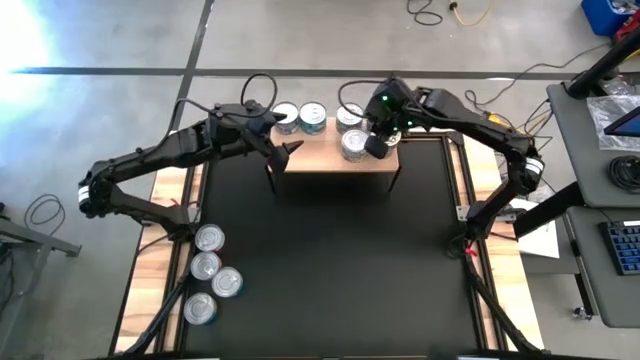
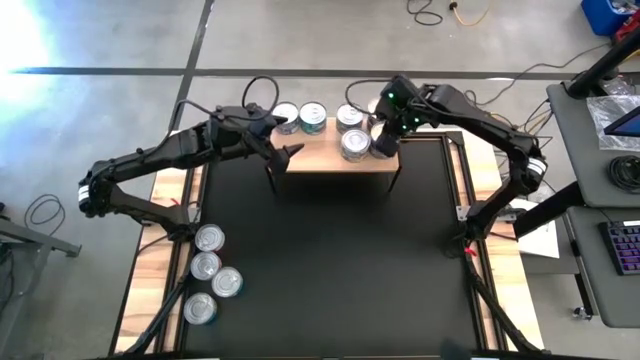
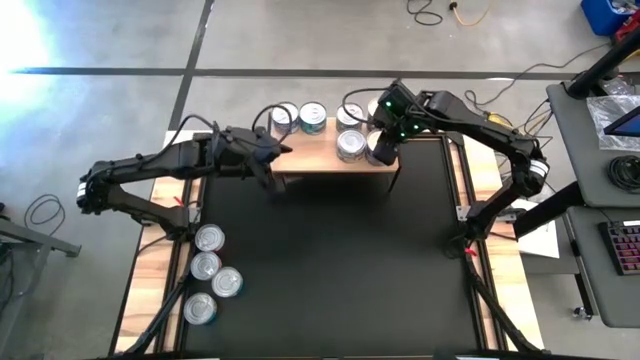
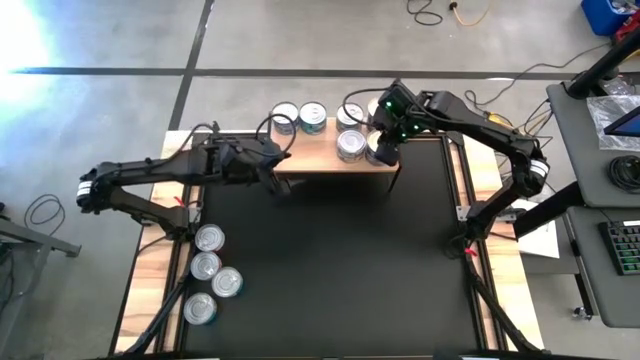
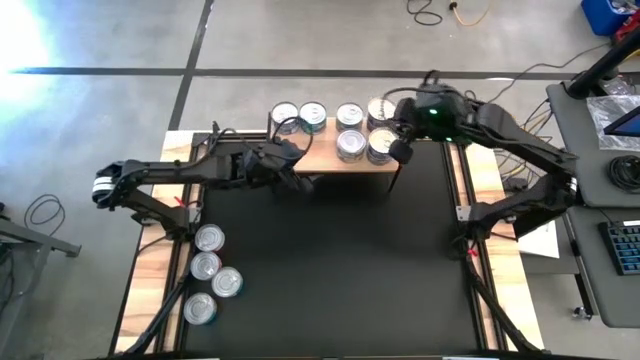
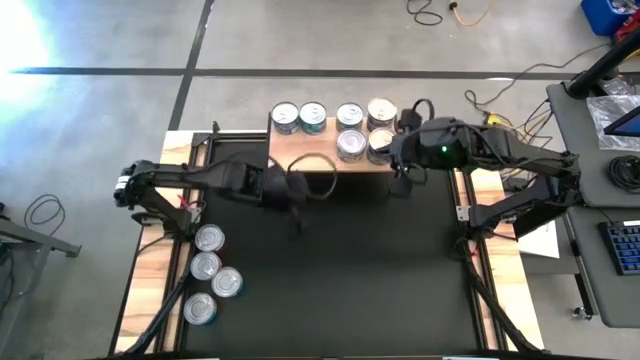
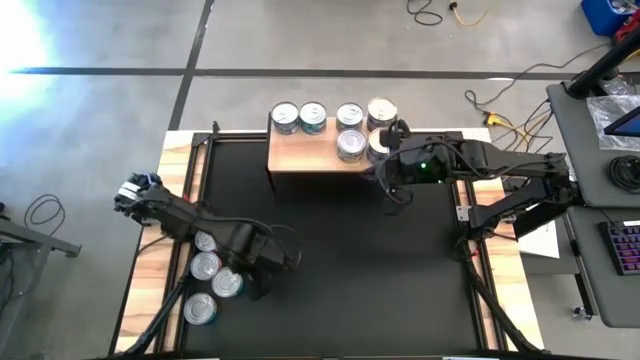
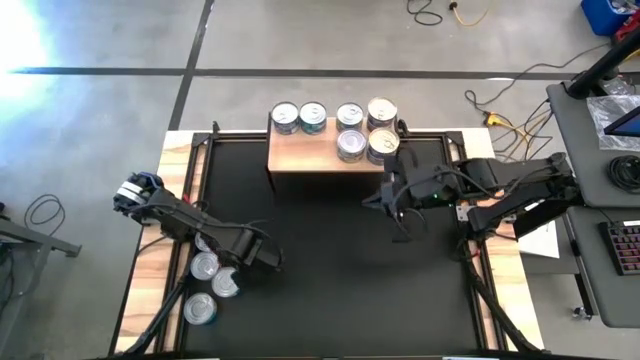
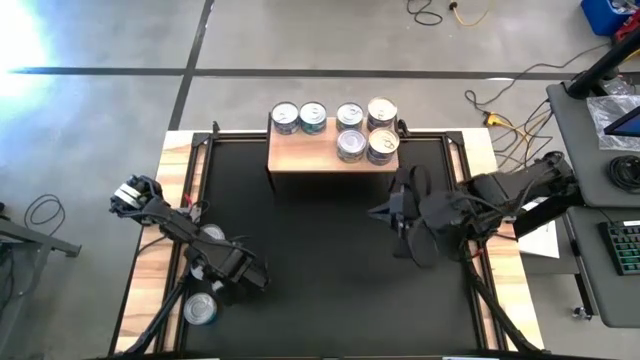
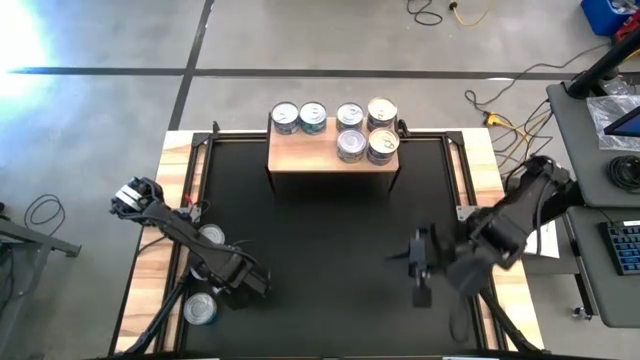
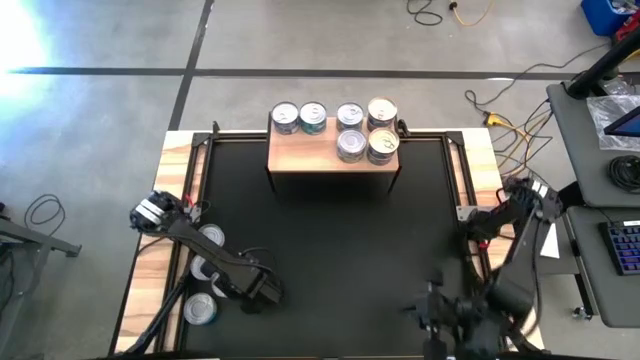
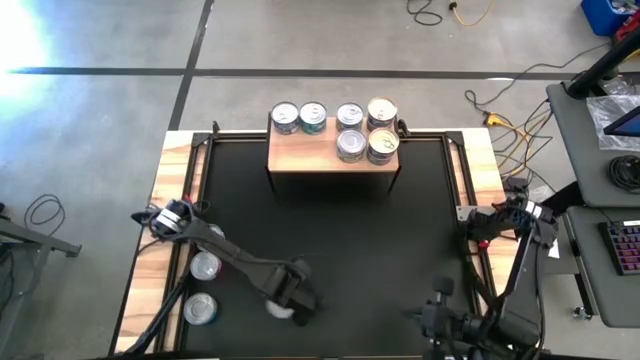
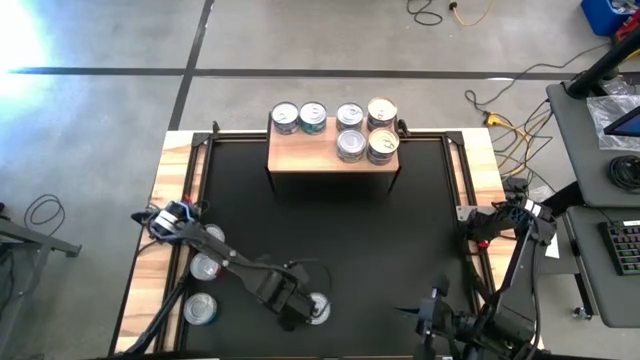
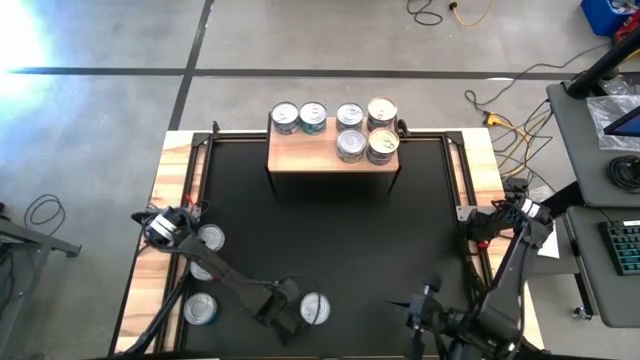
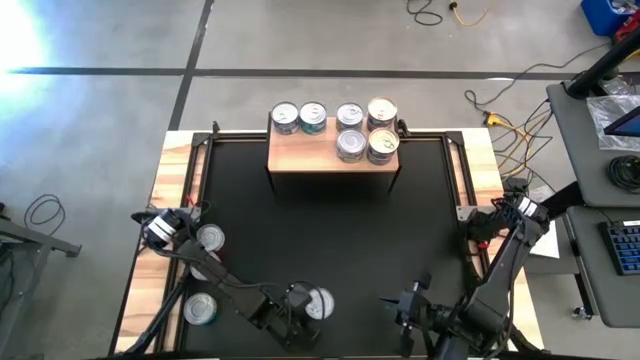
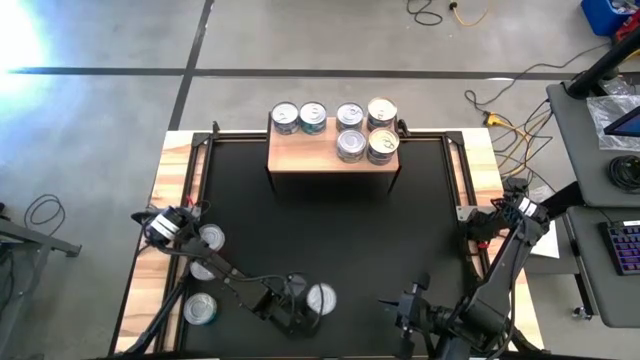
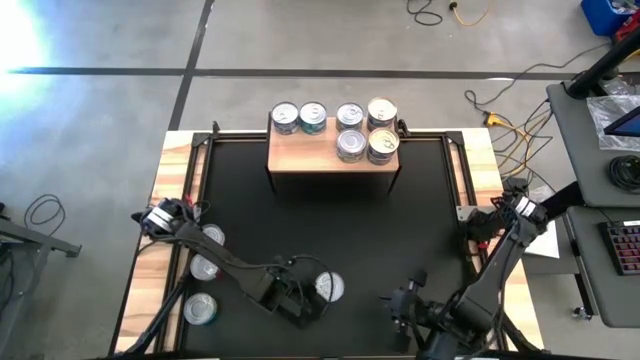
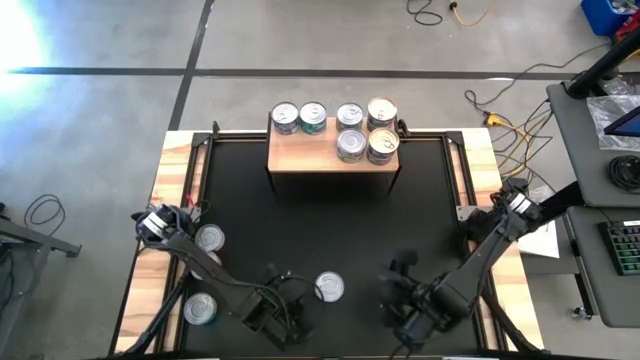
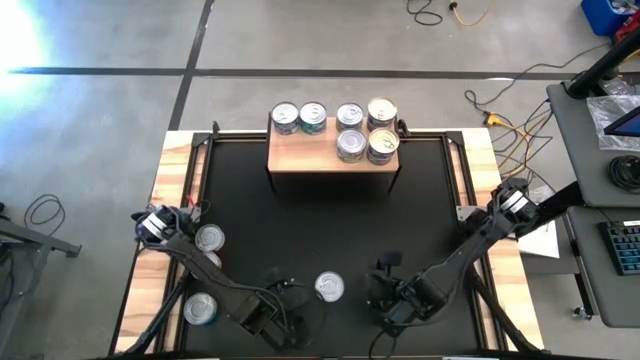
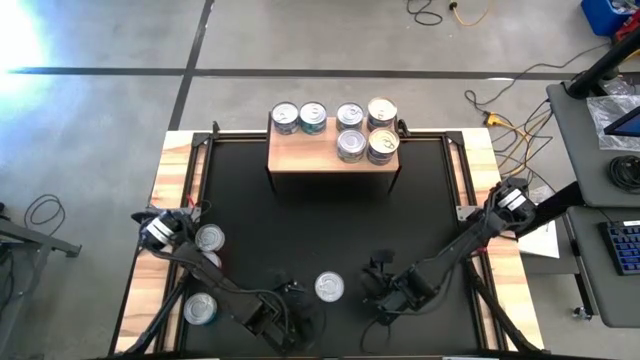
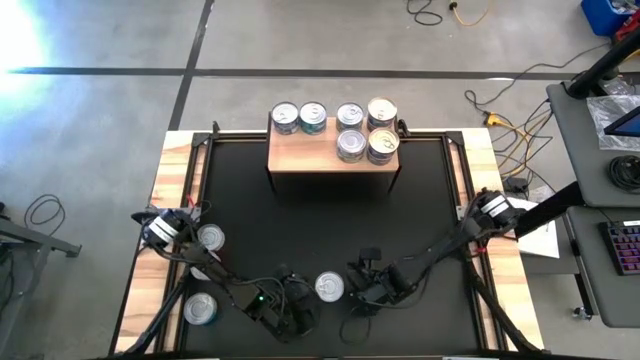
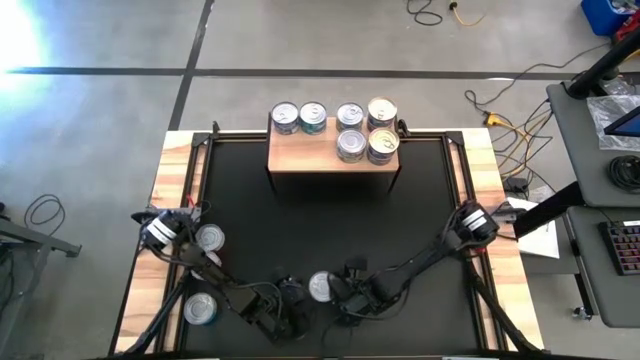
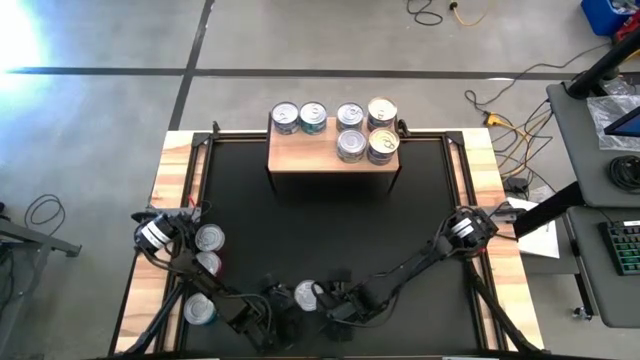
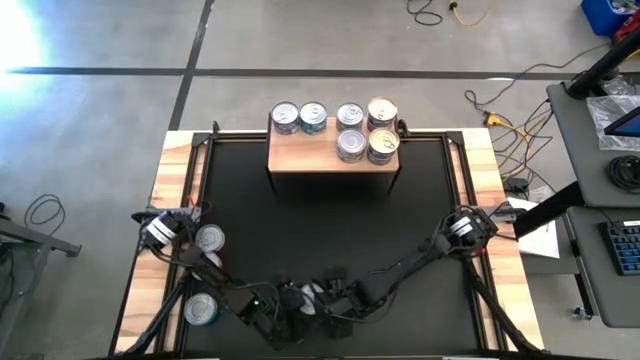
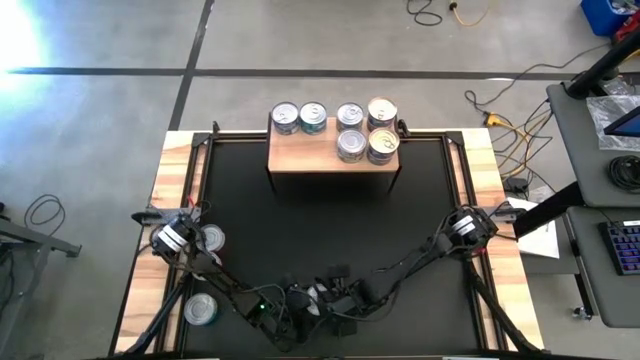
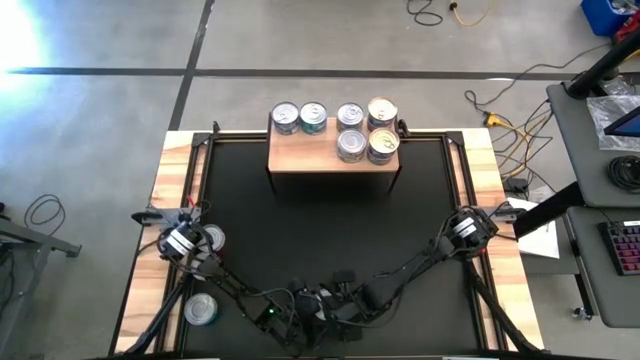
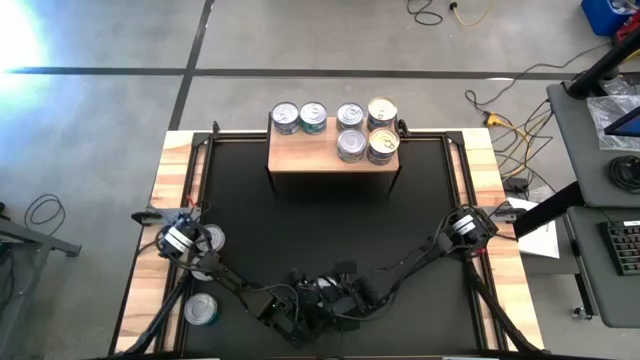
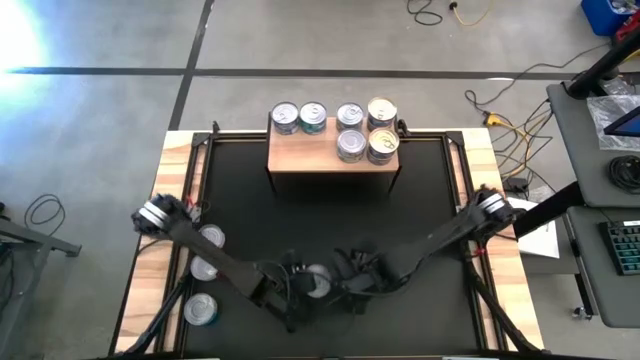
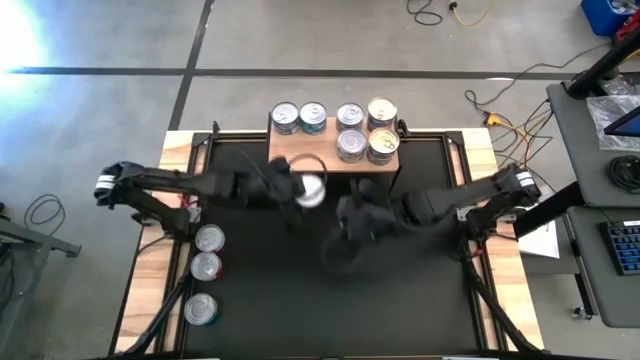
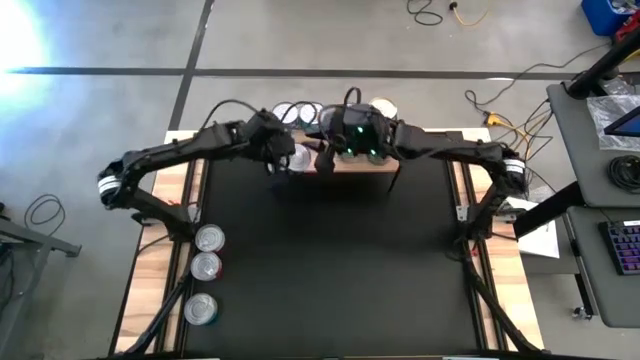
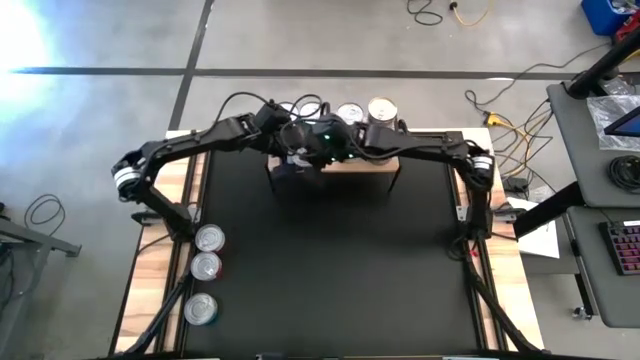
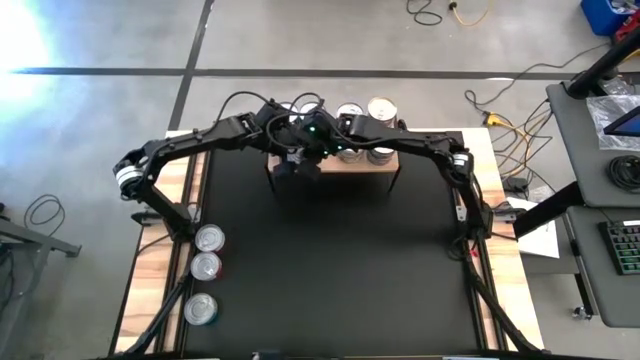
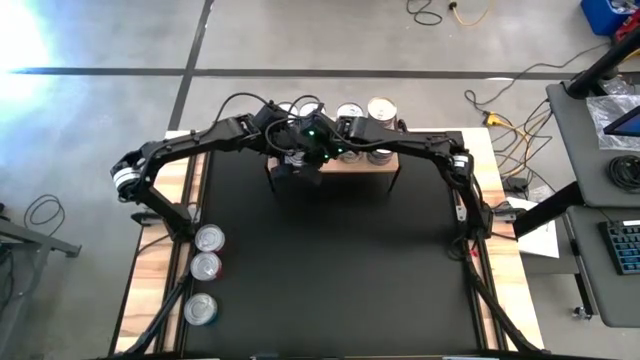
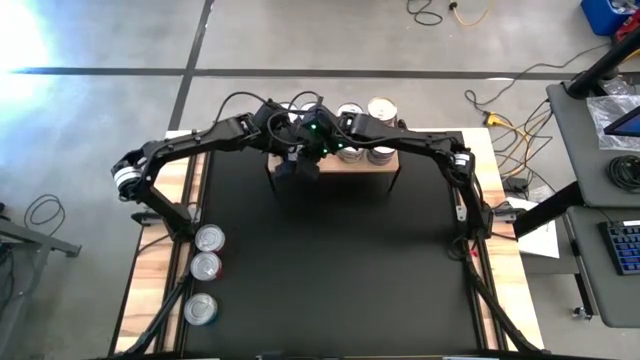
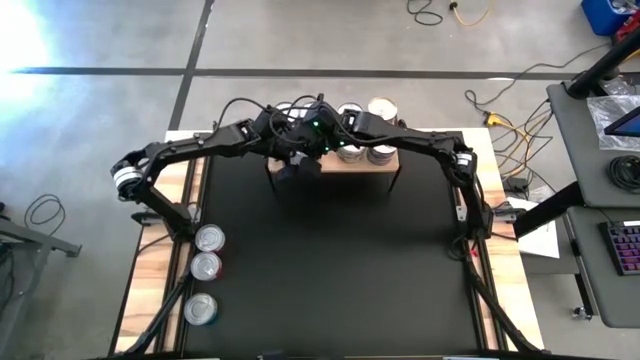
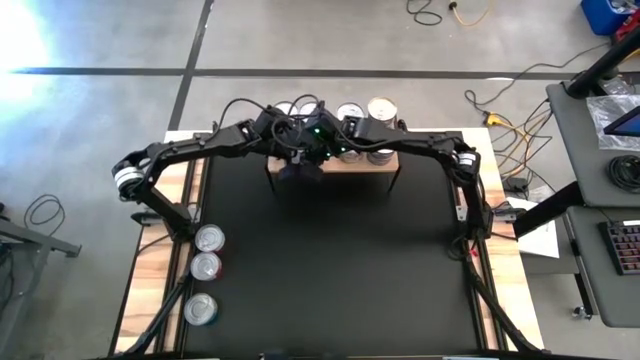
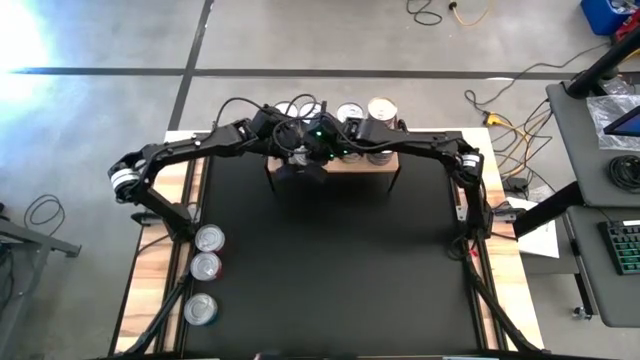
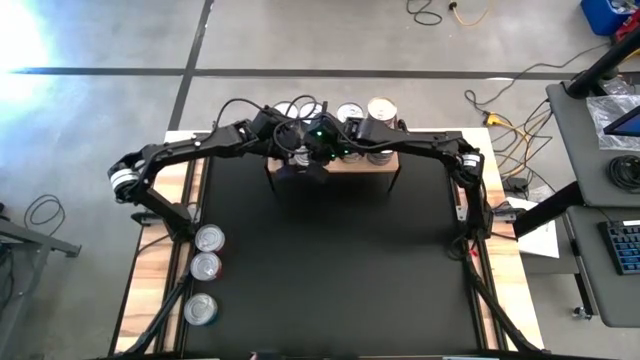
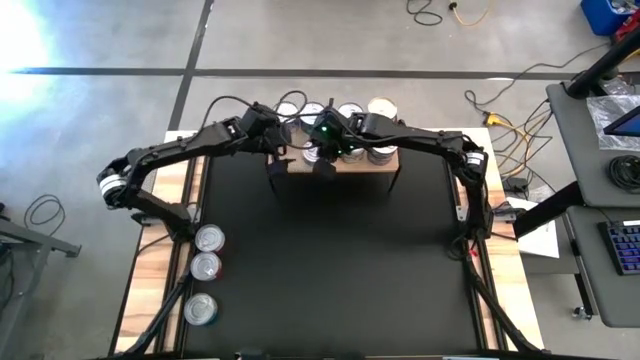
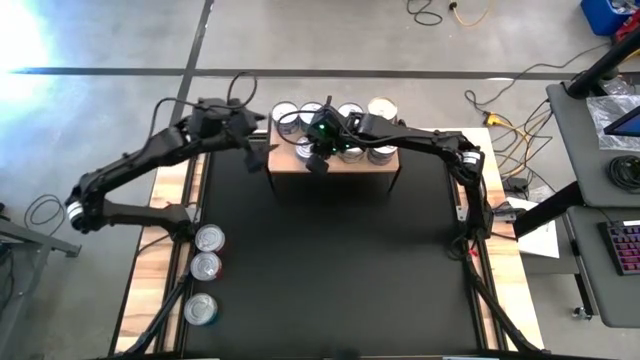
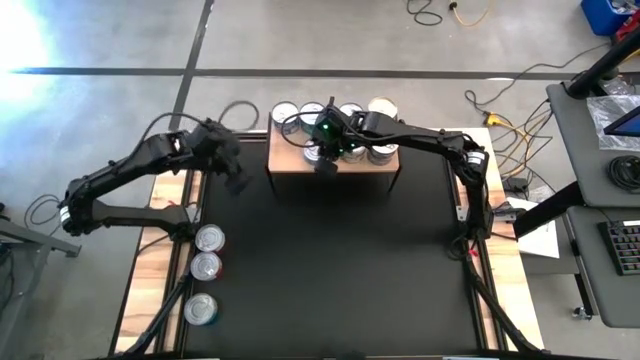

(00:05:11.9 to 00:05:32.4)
Task: Stack canned seafood by type on shelf
Put the top yellow-blue tuna can on the shelf

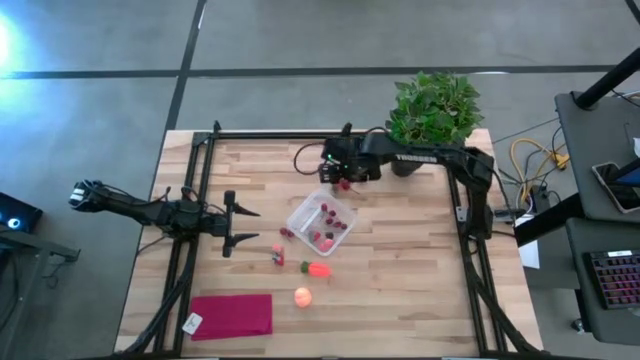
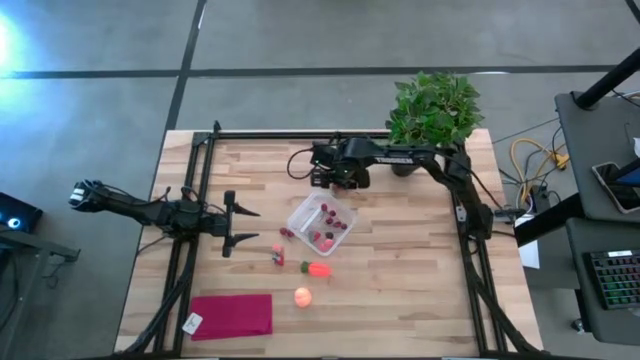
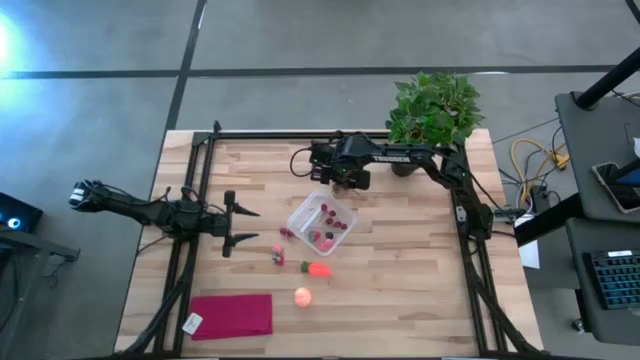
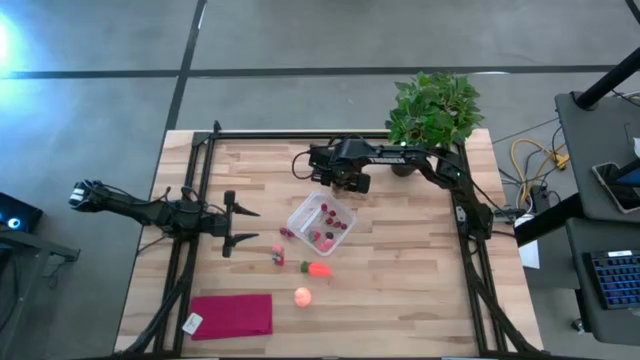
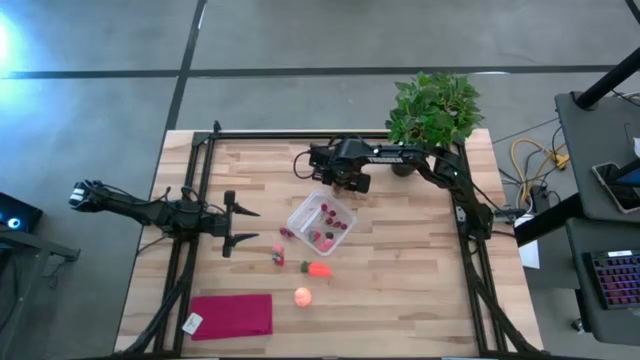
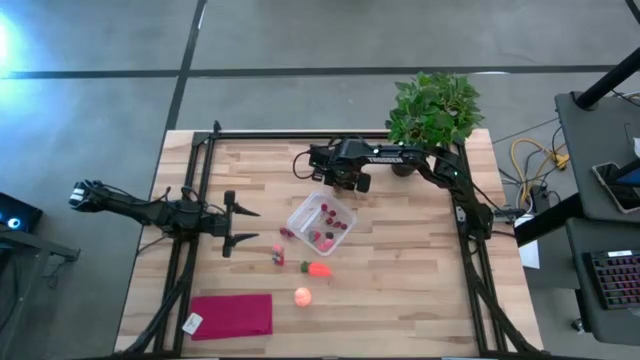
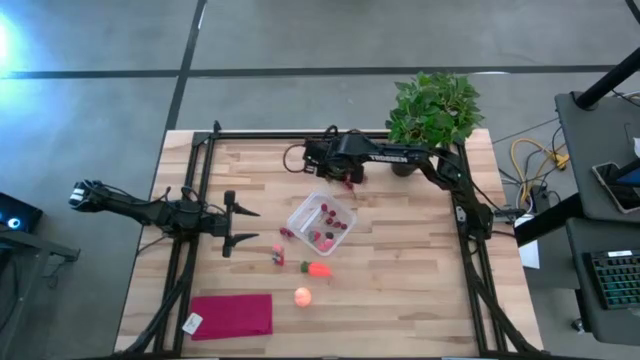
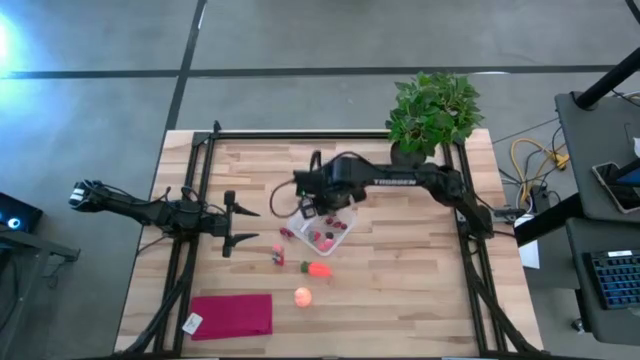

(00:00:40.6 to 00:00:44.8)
Task: Pick and placing Produce into tupperware
Put the red strawberry into the transparent container
